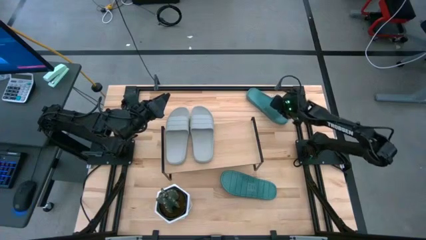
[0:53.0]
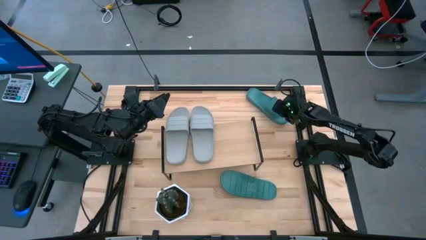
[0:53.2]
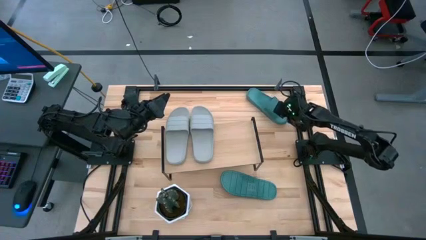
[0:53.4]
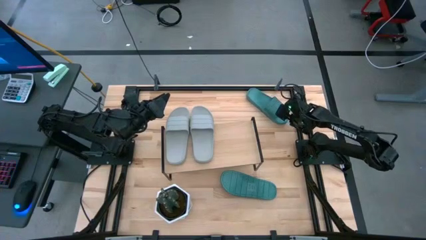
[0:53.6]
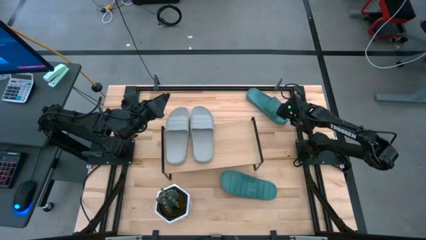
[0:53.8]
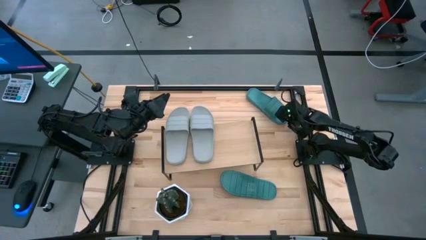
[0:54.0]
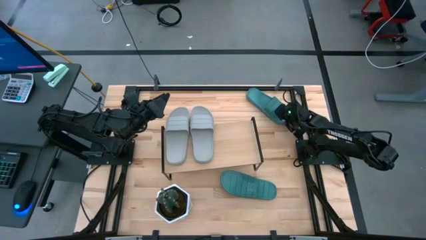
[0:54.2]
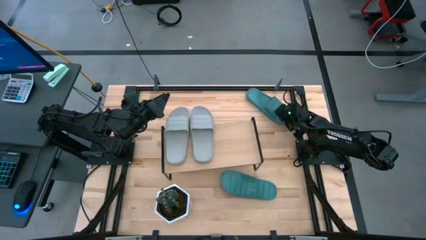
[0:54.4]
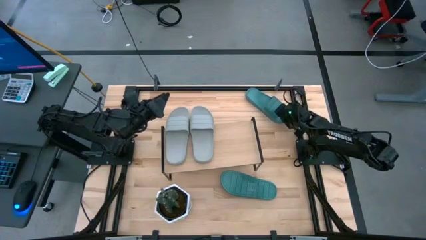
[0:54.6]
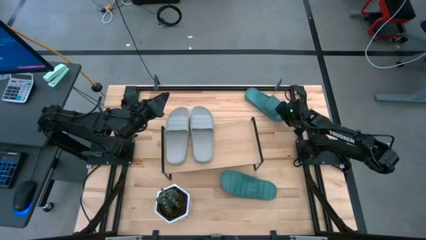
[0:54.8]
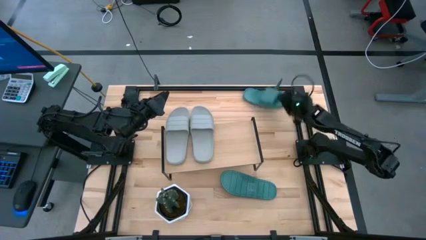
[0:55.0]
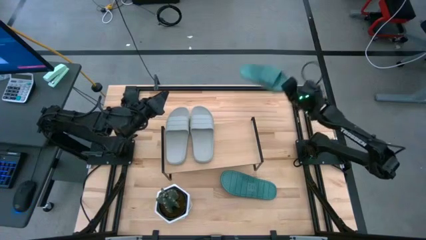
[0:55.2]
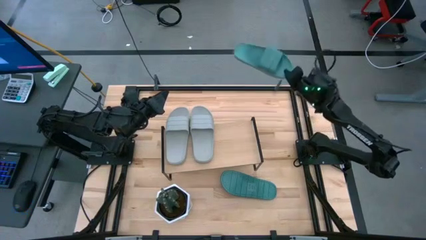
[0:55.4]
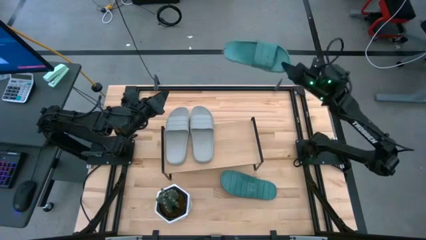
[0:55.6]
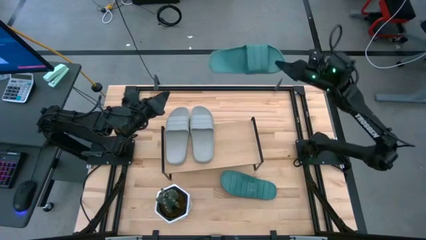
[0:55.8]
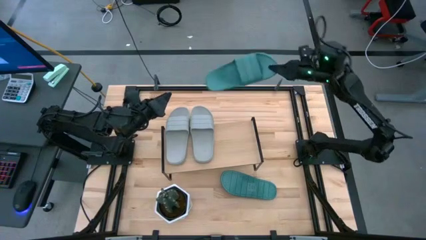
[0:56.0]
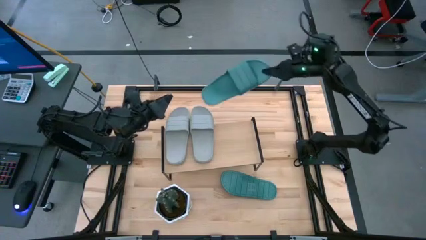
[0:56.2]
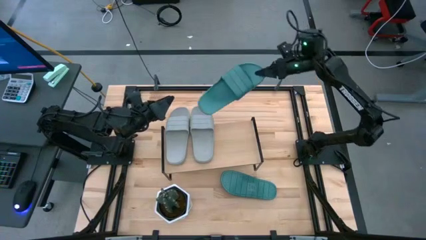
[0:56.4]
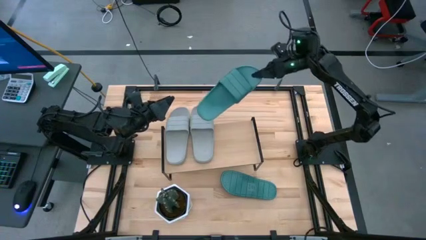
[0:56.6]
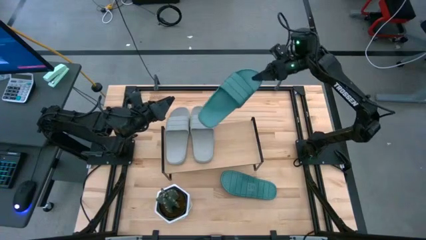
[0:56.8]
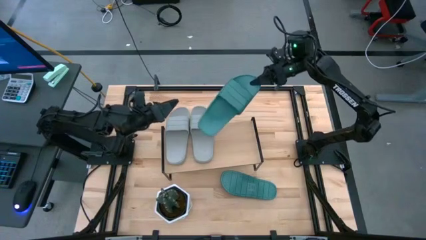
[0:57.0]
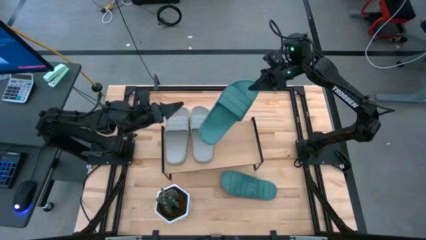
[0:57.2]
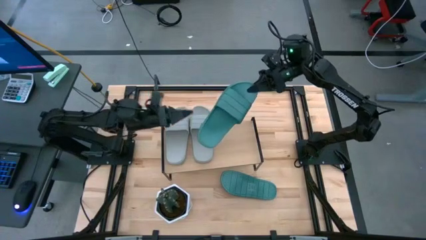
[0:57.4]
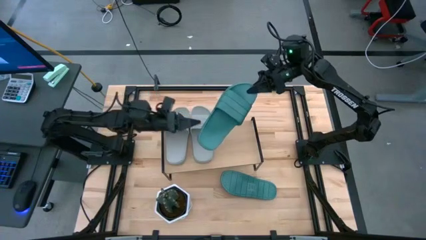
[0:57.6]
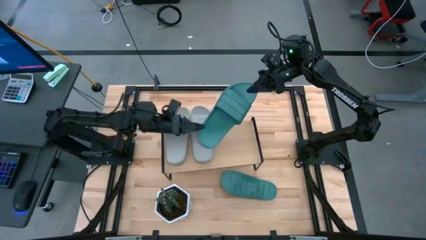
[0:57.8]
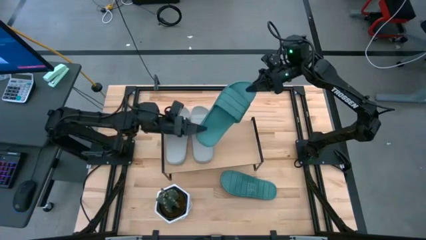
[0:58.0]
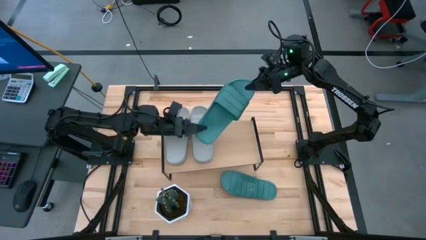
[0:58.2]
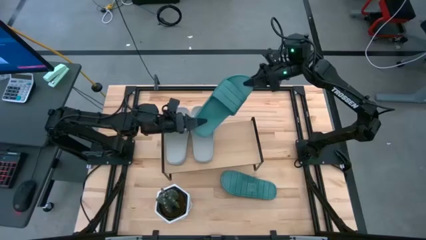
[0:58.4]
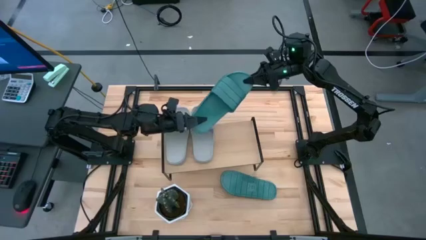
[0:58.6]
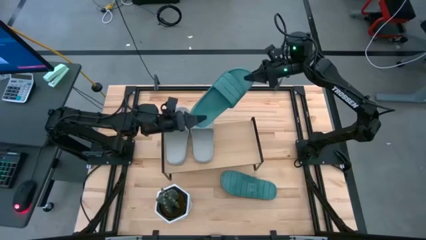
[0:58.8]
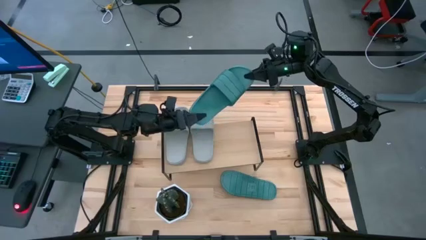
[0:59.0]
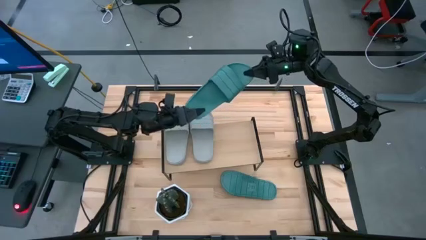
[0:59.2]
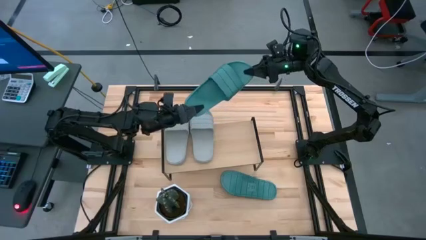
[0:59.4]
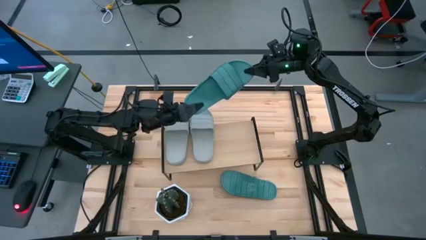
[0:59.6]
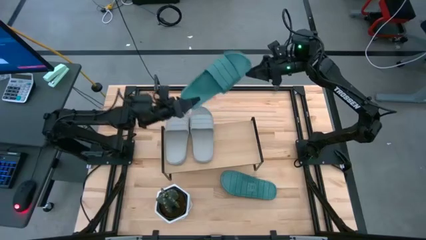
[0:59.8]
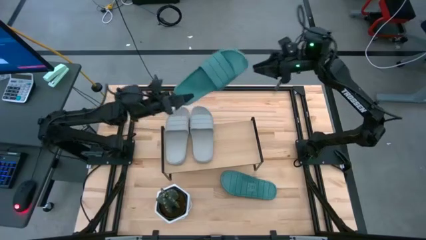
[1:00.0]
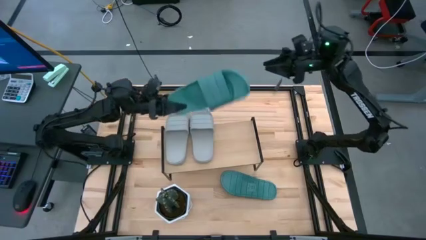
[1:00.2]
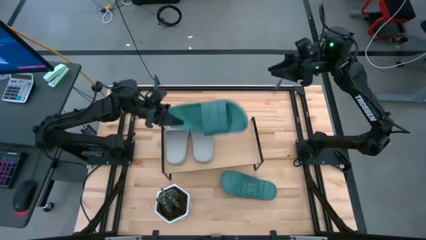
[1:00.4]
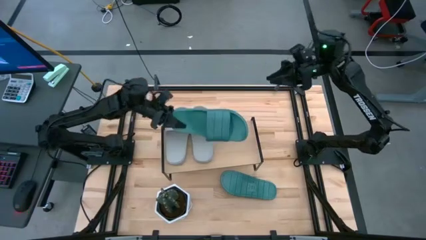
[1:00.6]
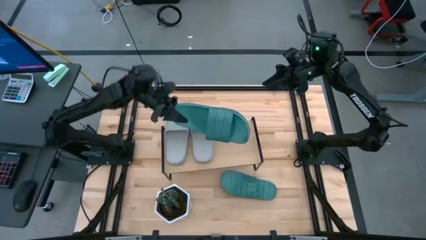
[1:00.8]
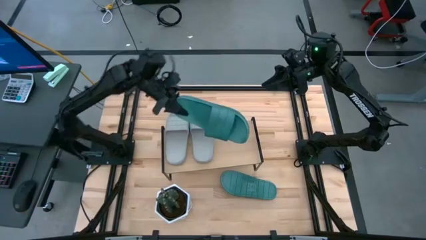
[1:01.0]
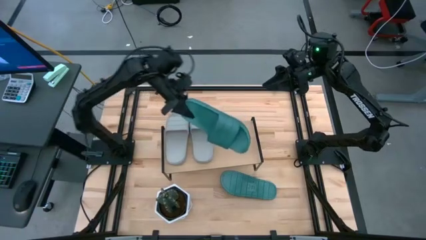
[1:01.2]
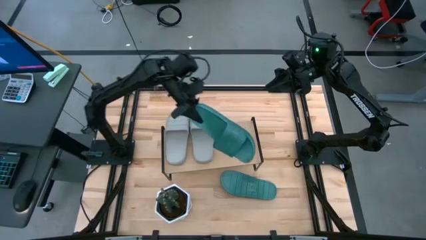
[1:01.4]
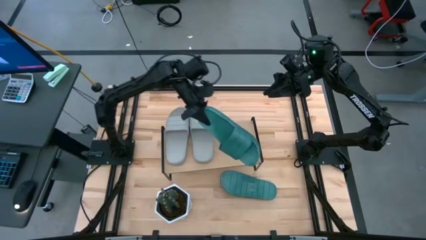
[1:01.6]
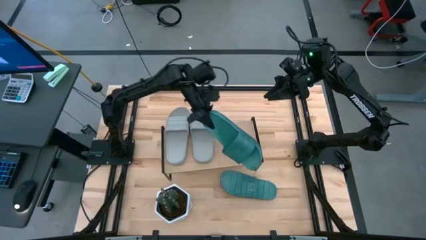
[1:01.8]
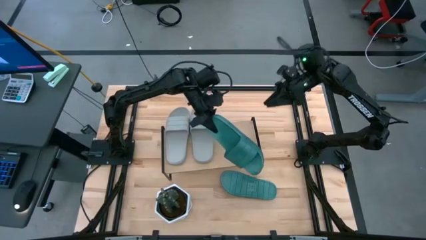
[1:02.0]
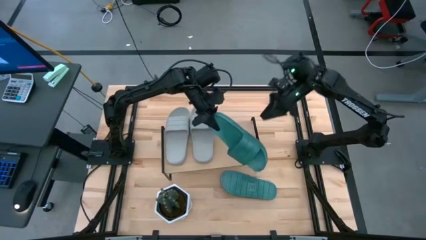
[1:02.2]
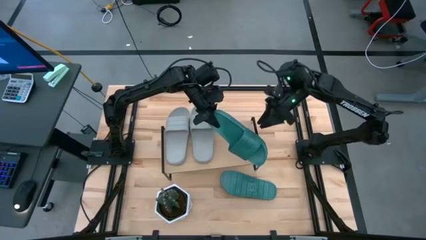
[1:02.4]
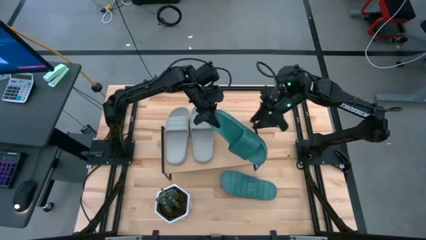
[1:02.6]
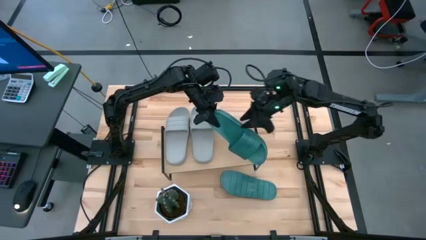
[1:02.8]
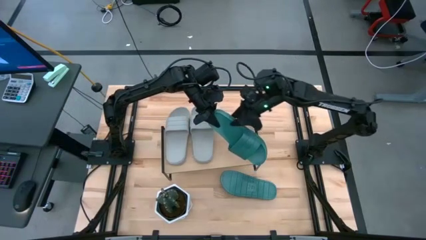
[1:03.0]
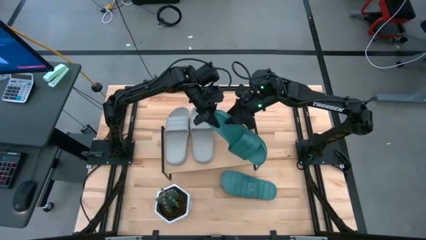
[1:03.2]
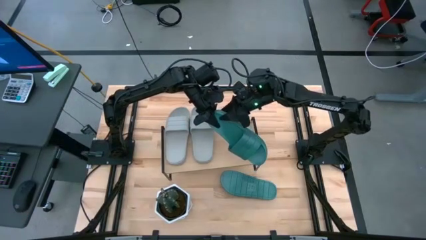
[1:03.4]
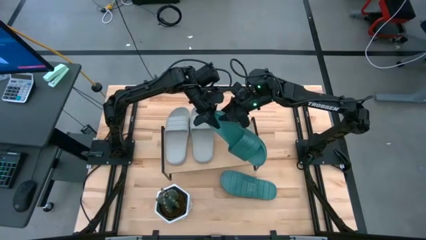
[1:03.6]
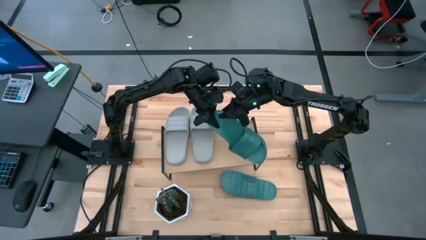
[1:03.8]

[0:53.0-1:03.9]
Task: Pick and place slides into the shelf
Put the top green slide on the shelf
